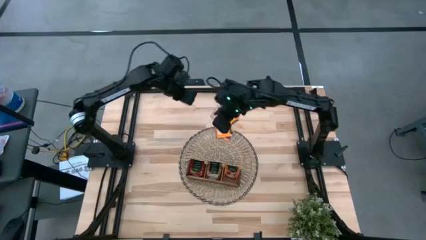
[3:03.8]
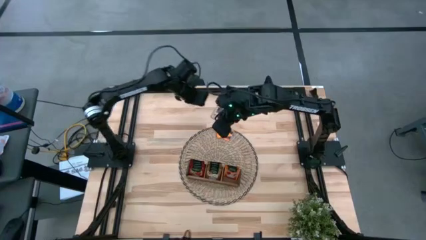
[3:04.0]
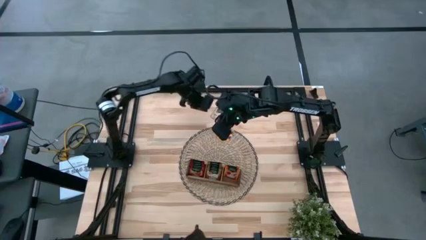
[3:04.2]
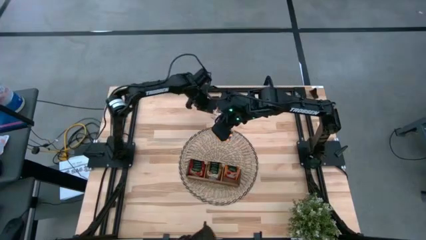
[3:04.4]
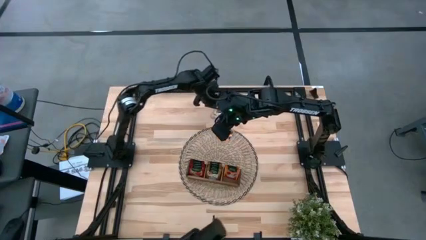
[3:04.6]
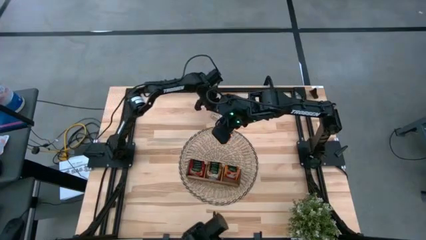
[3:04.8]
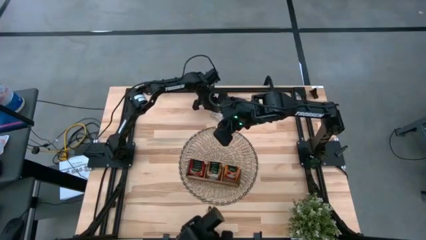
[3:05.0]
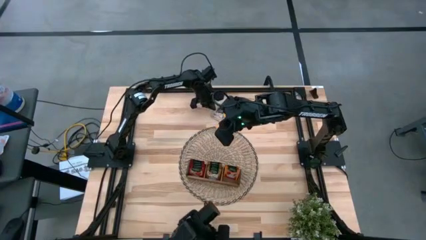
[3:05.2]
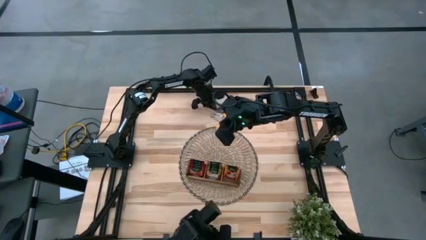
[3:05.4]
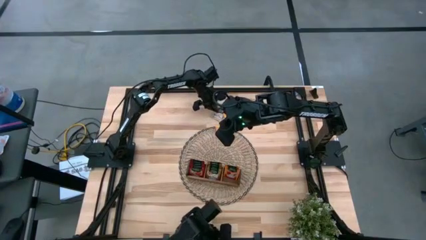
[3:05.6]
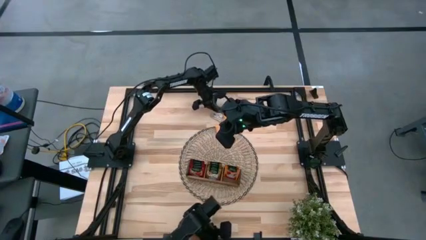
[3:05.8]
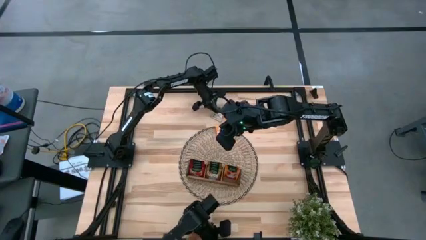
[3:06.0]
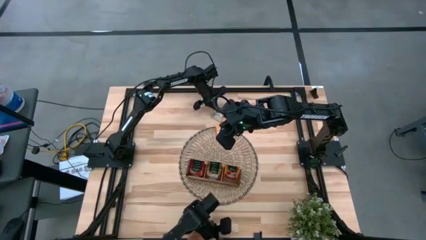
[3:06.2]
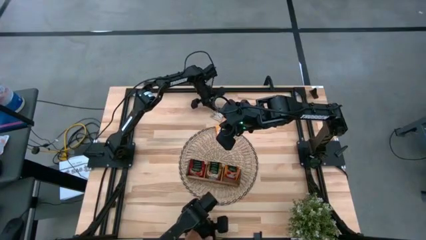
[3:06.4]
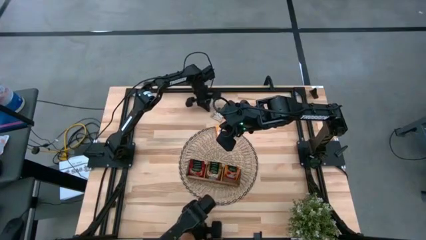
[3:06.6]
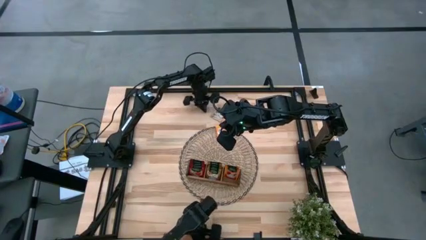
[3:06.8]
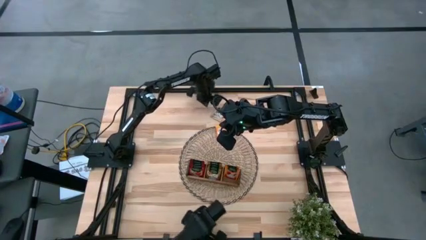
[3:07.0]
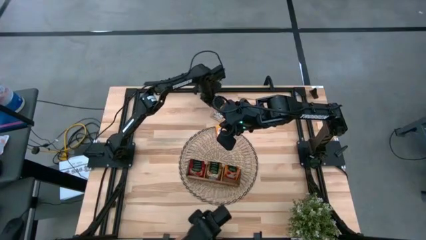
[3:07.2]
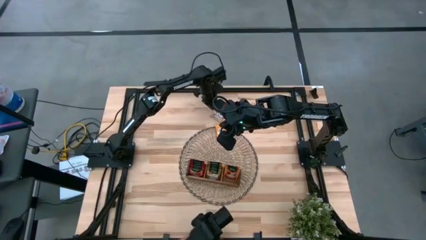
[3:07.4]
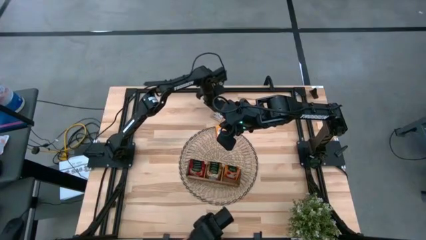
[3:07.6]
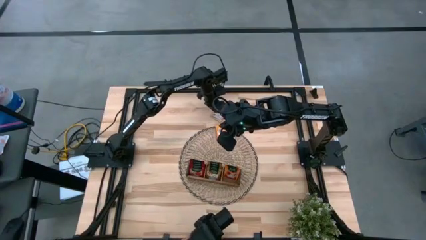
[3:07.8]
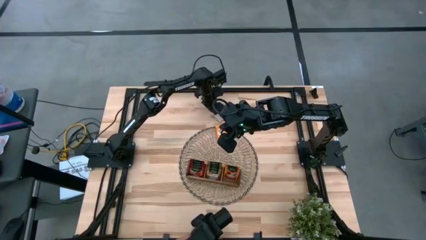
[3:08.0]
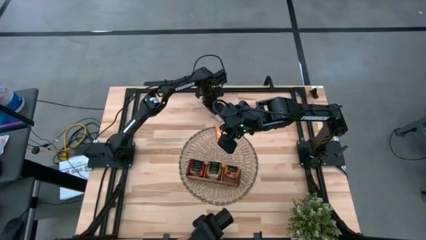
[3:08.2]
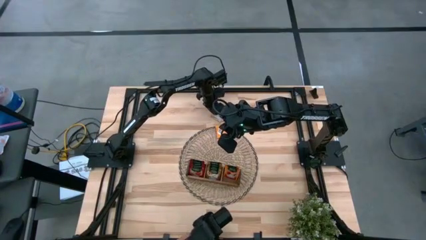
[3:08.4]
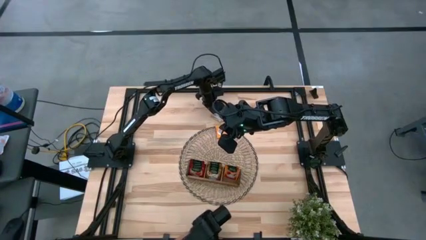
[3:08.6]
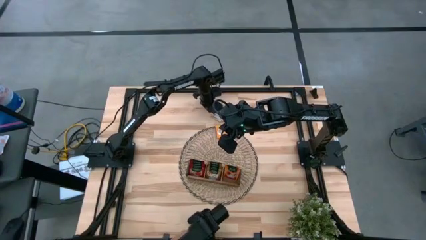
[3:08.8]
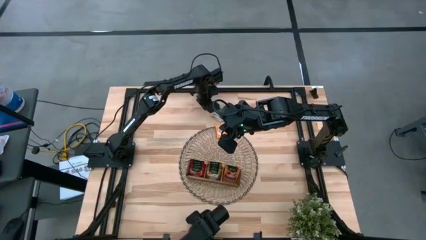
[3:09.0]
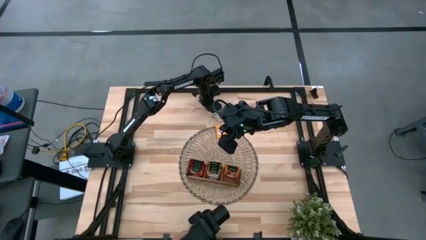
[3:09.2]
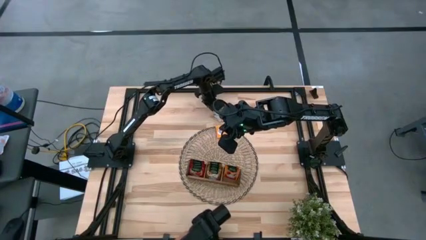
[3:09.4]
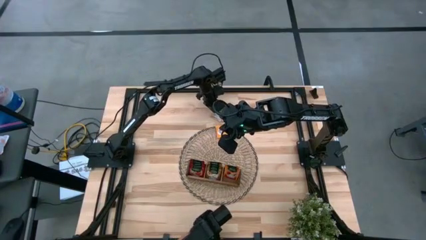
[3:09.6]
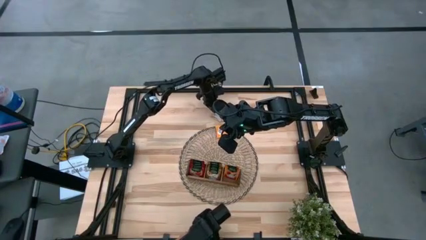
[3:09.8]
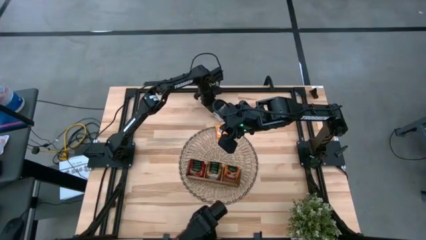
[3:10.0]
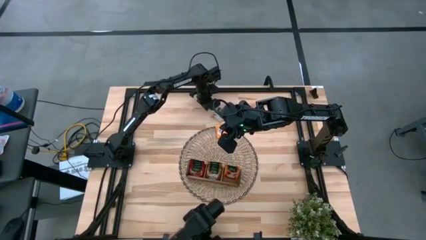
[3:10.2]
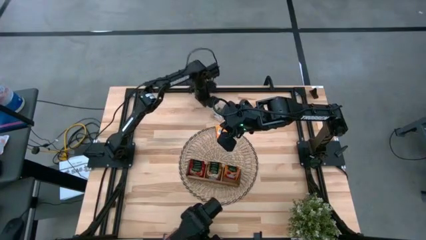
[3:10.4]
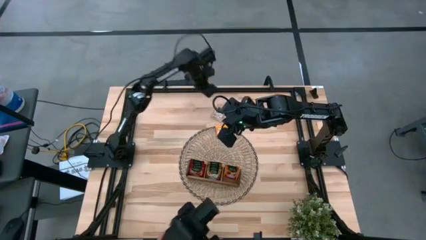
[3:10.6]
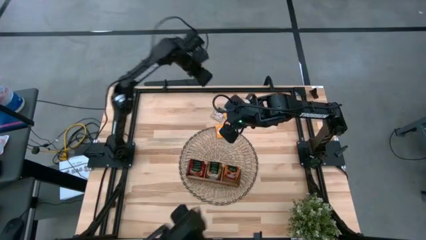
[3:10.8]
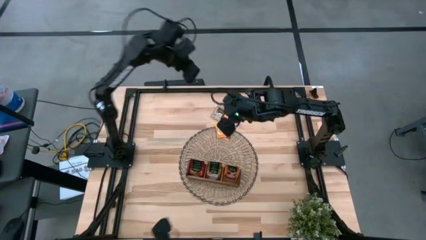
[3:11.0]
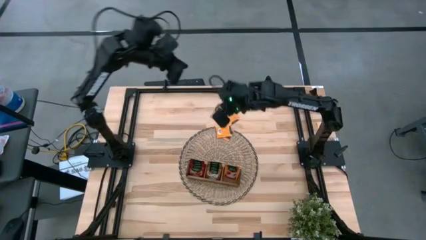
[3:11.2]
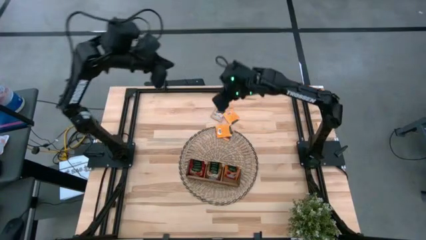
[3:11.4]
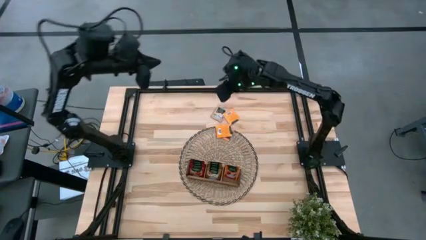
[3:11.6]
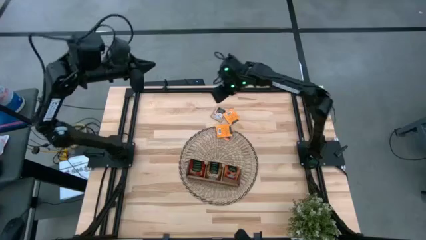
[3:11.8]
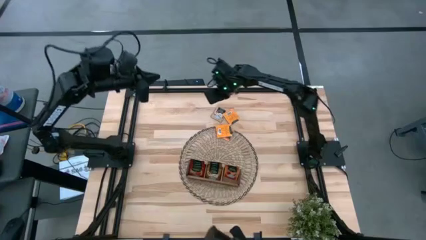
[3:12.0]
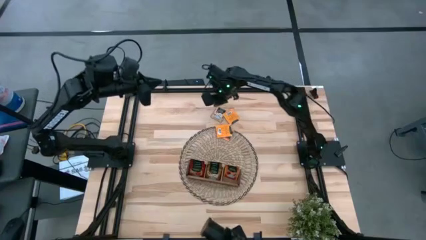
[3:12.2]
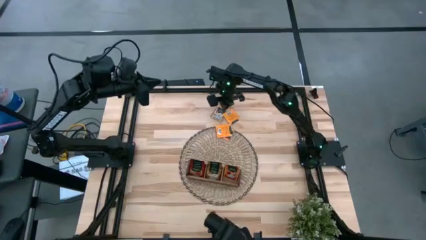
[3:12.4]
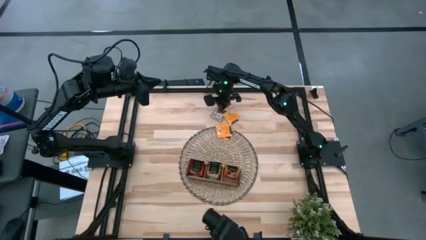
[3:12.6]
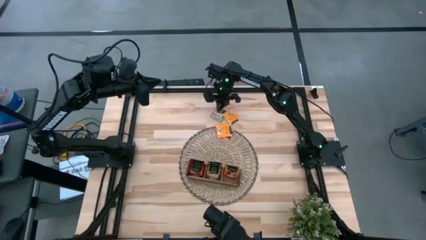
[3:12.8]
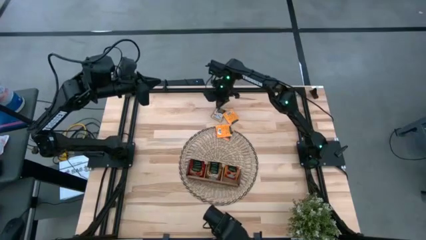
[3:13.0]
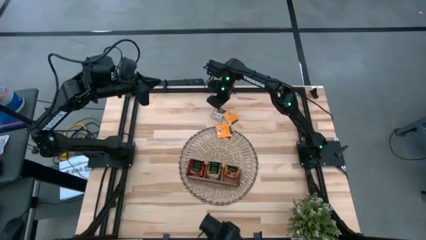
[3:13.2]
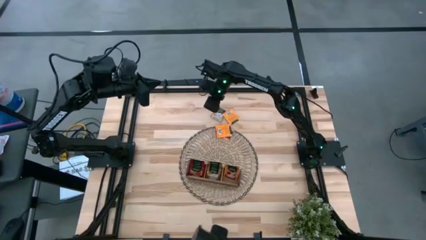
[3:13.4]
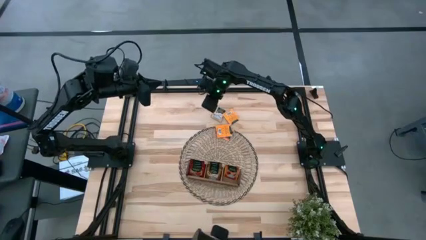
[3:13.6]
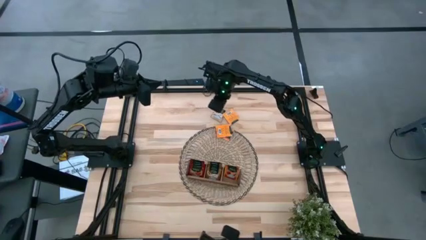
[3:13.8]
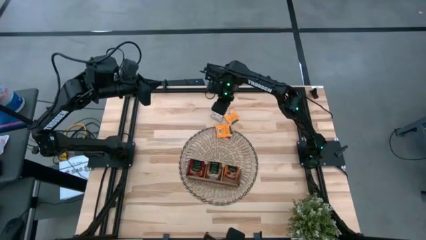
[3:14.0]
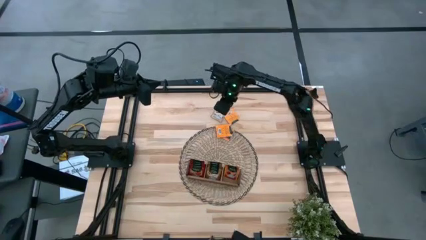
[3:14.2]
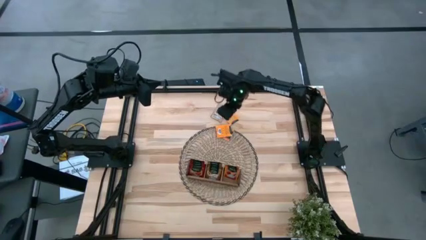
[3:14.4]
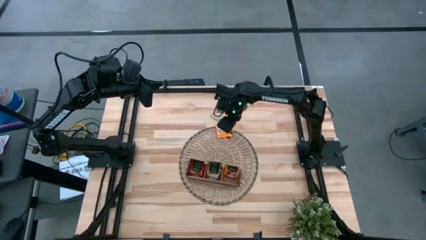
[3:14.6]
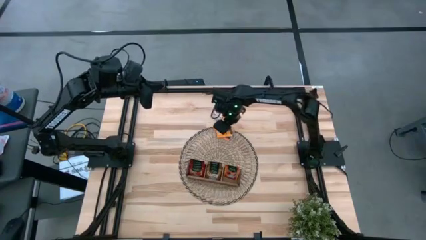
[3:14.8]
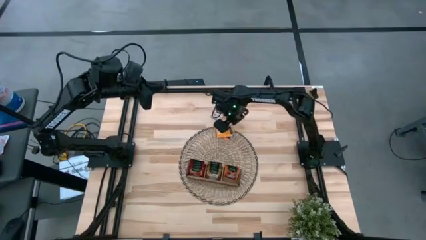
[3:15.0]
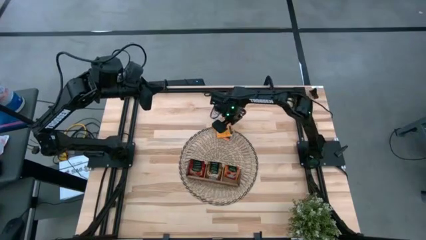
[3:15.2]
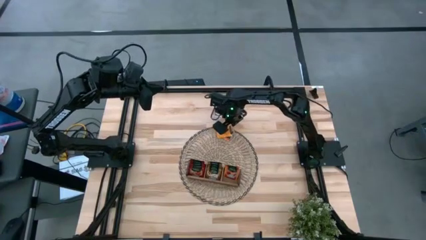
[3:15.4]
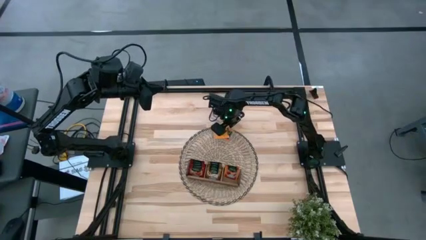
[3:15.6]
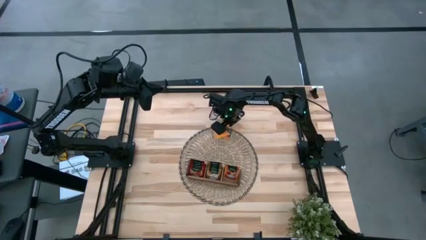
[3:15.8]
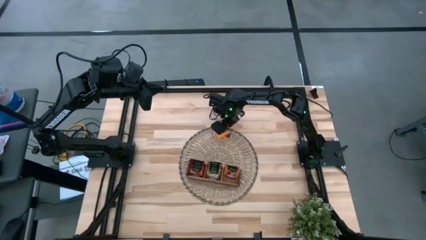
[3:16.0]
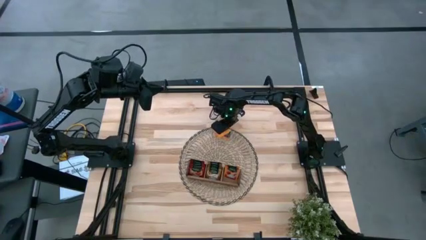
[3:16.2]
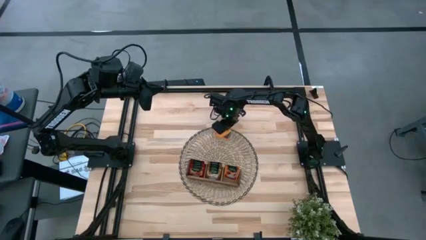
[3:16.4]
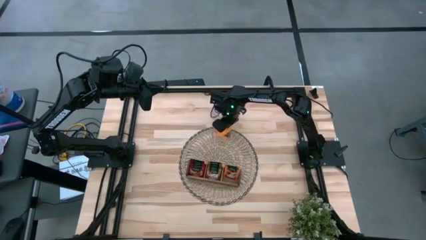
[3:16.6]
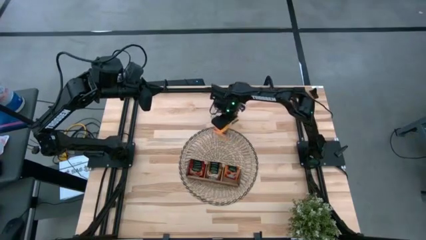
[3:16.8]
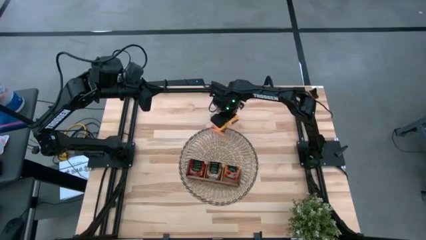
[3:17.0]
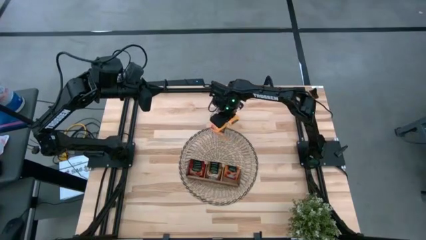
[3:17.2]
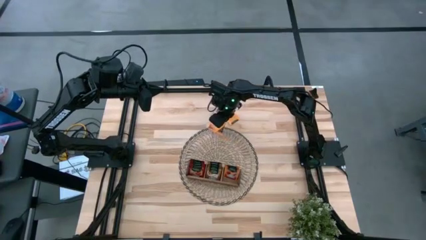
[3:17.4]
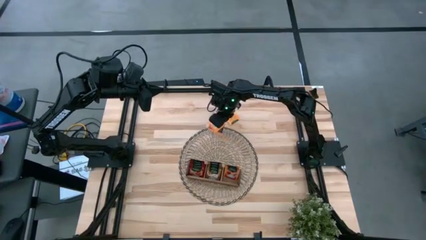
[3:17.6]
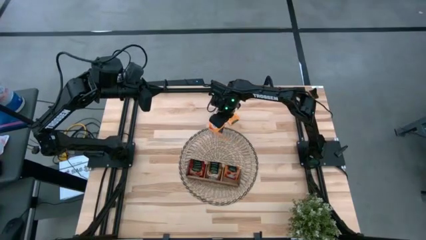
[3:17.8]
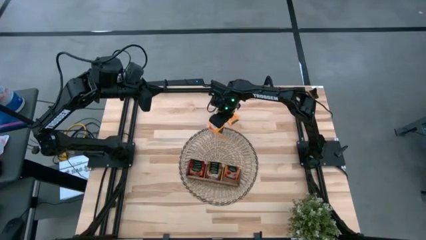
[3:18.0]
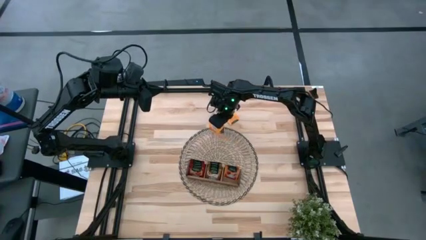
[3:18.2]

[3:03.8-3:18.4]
Task: Pick & Place Tea
Put the orange tea bag into the right section of the wooden organizer

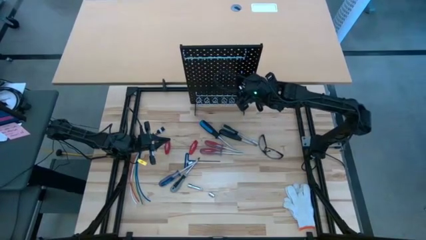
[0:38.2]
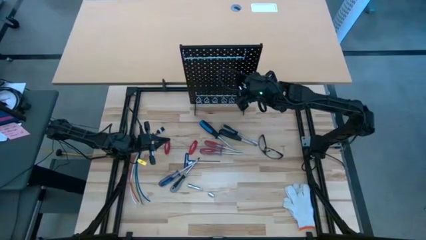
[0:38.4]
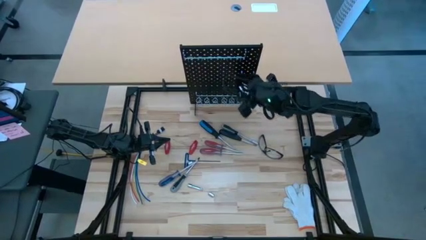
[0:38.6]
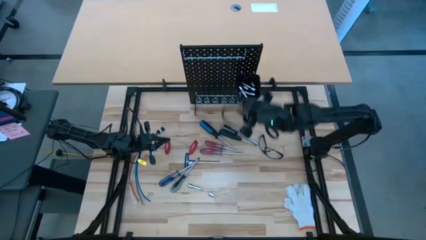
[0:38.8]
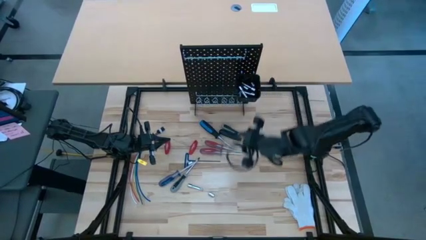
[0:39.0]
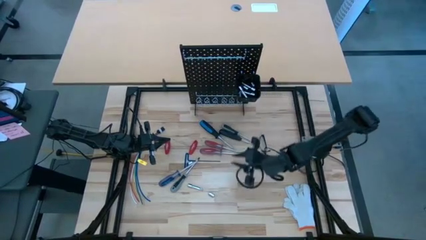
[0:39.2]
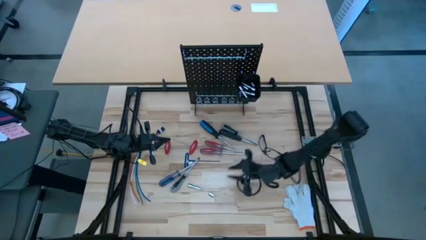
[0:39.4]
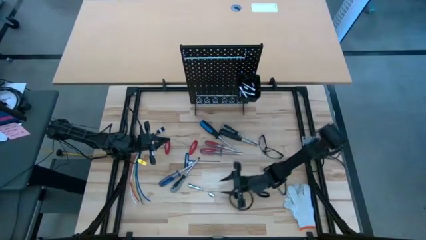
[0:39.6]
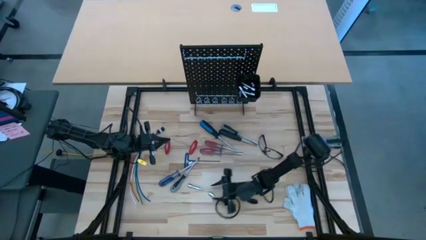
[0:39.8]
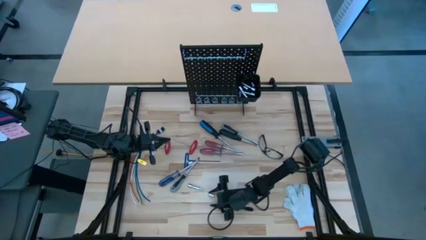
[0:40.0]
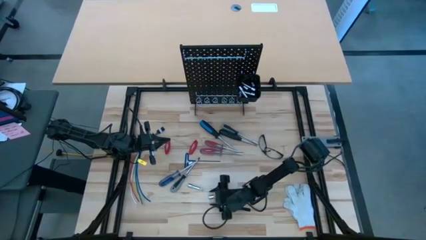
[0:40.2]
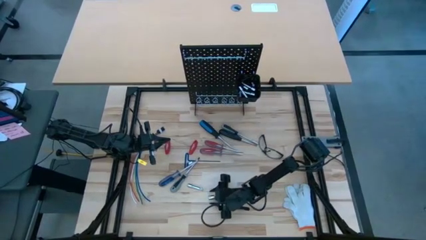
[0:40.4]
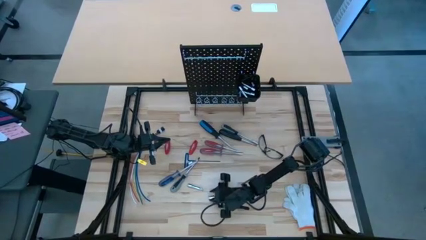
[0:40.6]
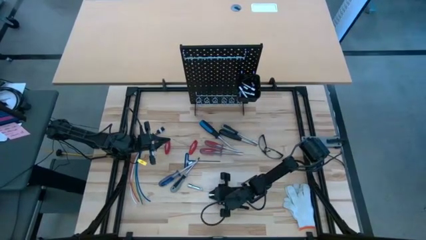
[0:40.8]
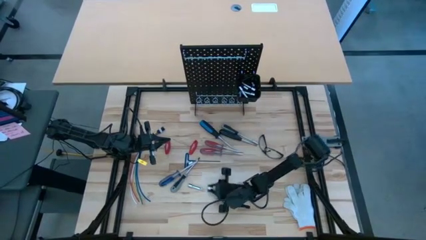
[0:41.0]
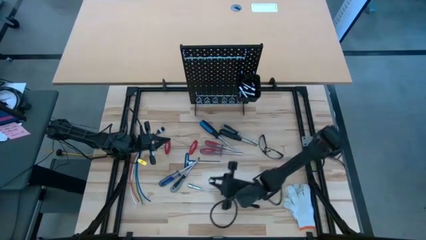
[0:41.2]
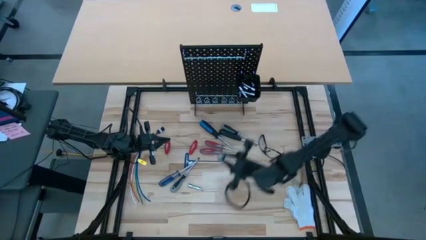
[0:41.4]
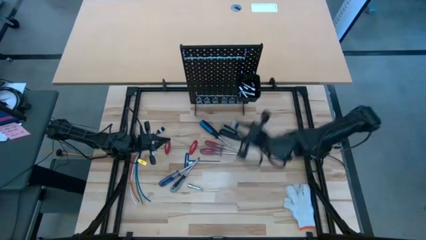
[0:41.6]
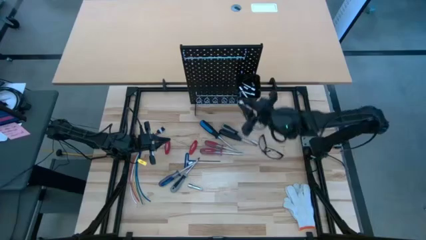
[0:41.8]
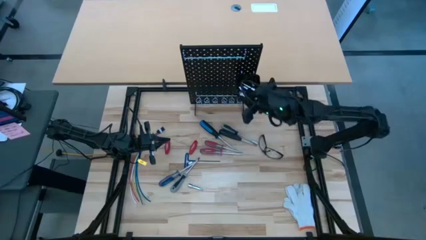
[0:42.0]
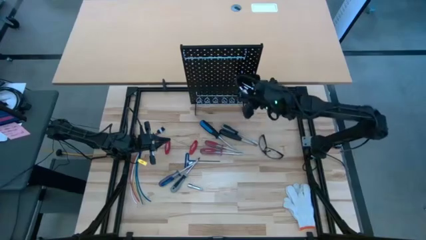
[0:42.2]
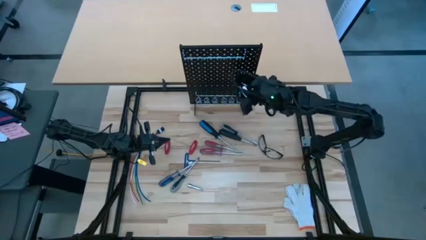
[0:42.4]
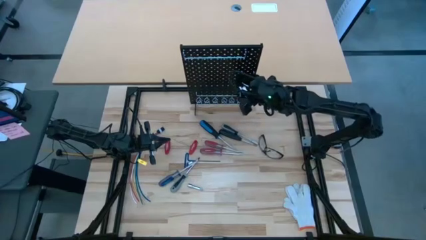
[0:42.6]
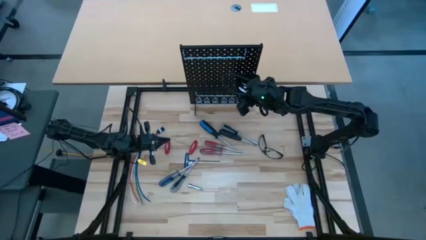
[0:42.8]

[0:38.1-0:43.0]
Task: Hang tools onto peg board
Put the socket into the bin of the pegboard
